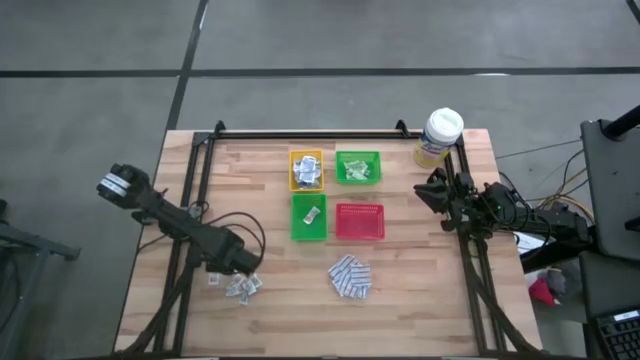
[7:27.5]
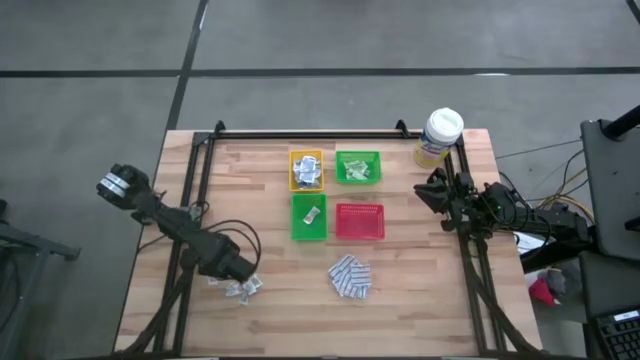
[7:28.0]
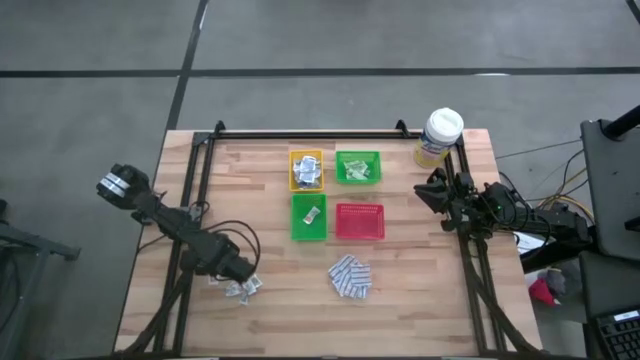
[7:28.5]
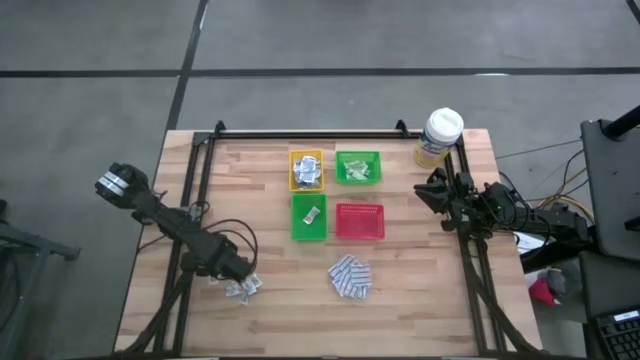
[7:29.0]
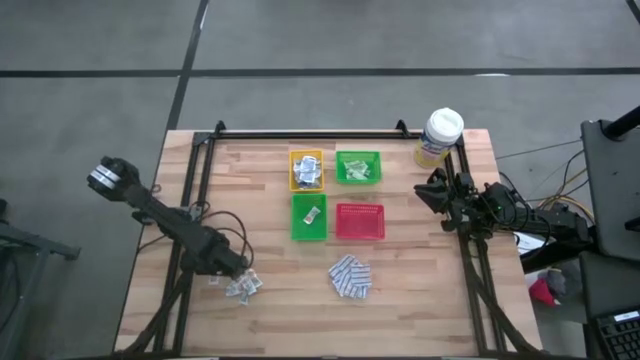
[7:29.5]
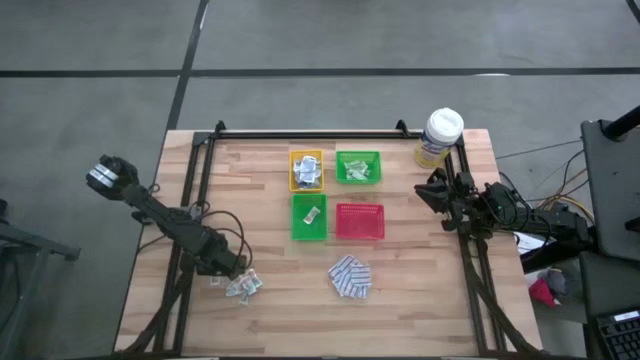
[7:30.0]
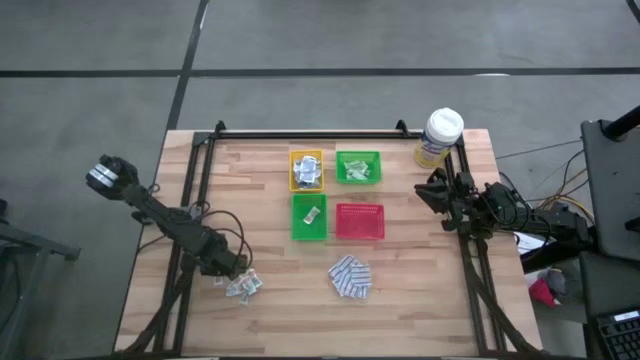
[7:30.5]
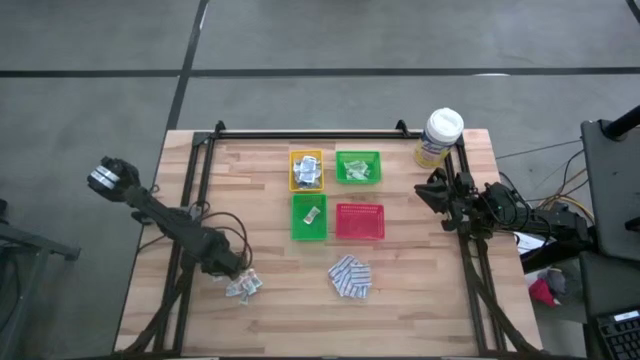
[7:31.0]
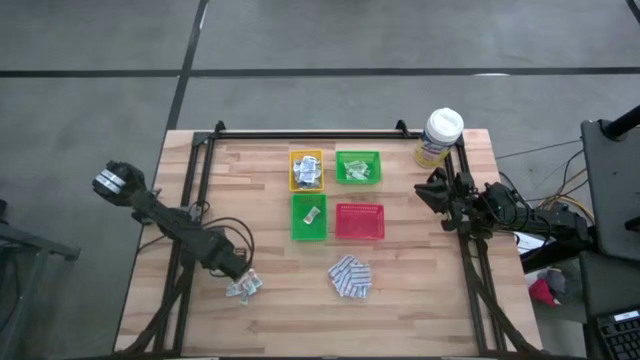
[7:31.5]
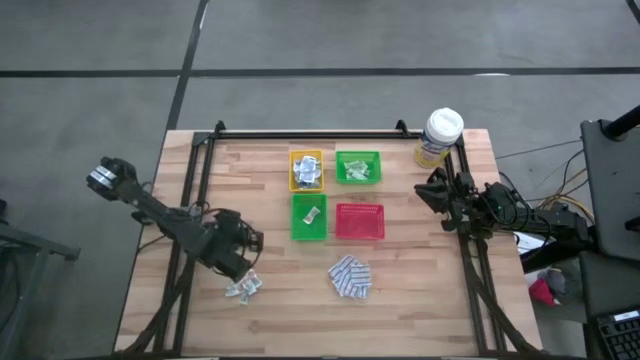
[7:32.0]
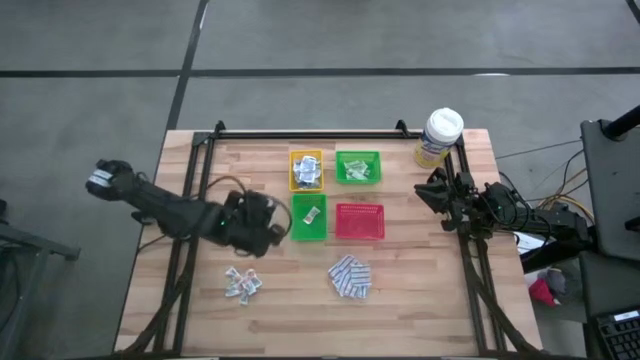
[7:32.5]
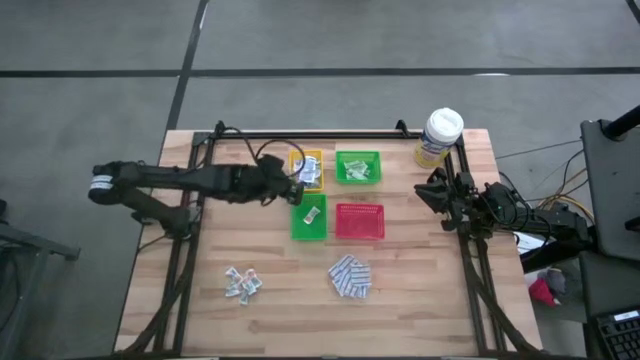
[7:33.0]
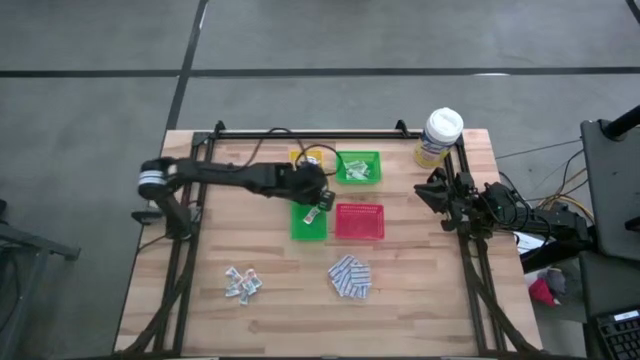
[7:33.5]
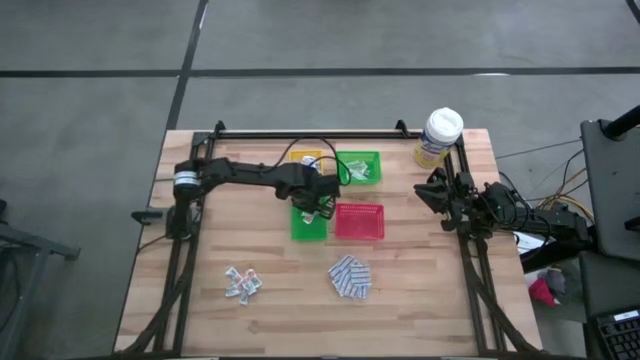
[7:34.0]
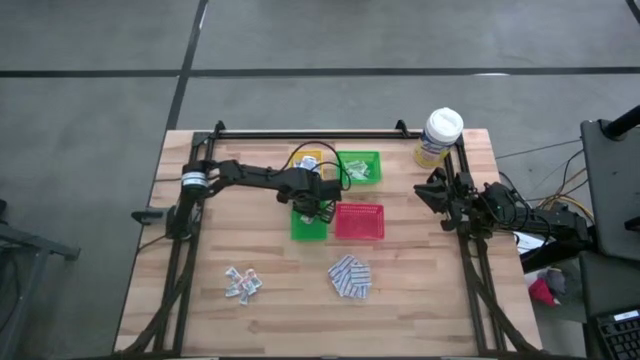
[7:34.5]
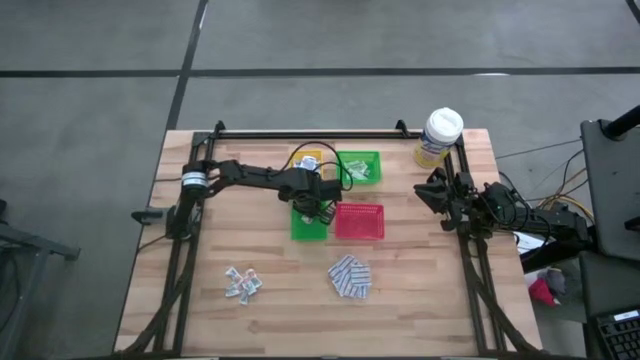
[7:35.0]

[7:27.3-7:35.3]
Task: Pick & Place First Aid Supplies
Put the orange ointment pack into the bottom green bin

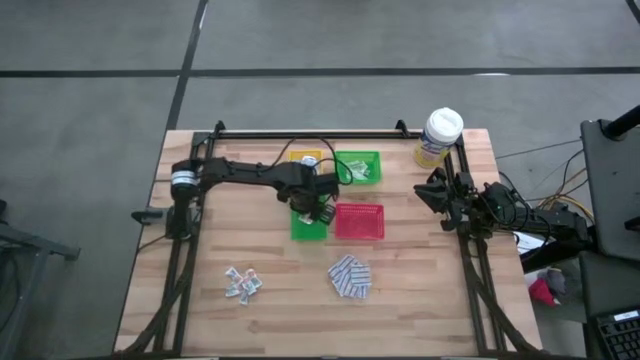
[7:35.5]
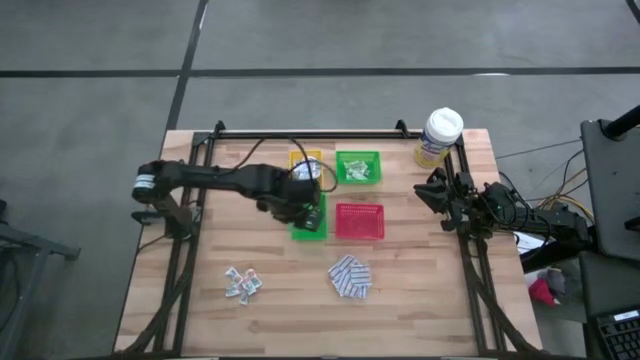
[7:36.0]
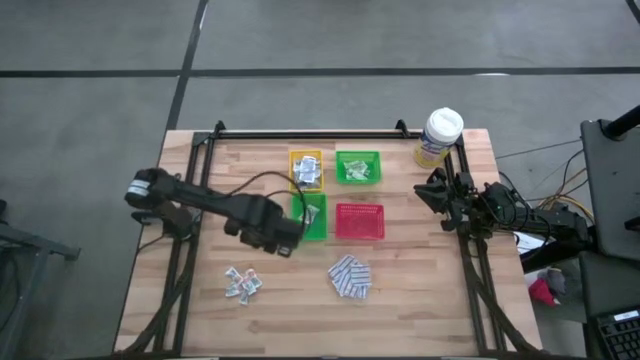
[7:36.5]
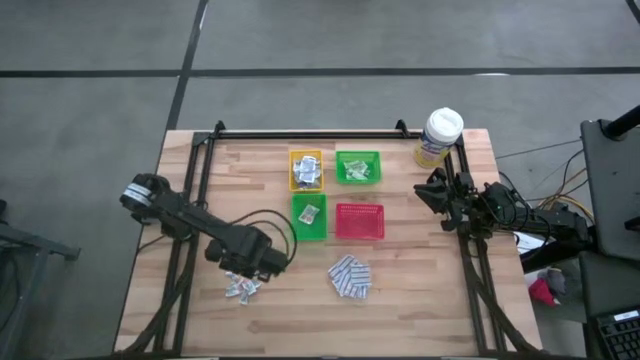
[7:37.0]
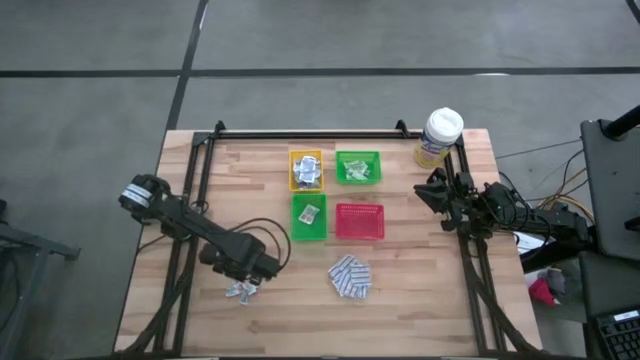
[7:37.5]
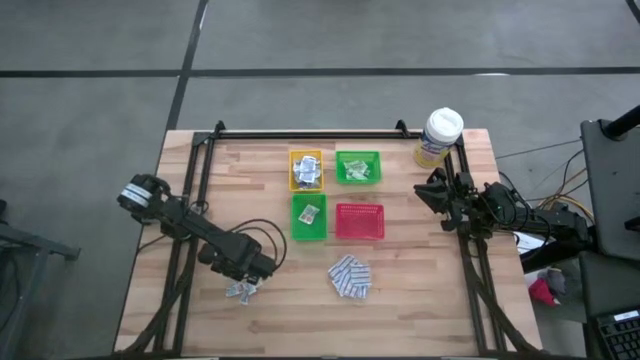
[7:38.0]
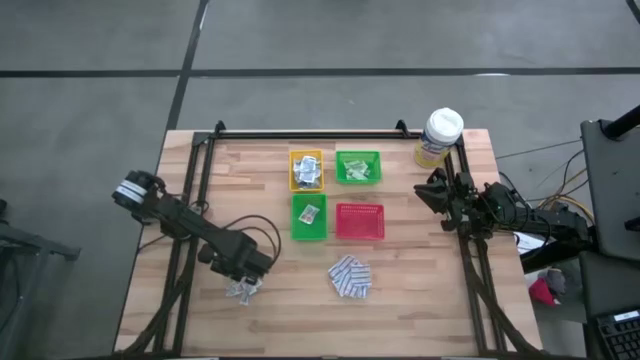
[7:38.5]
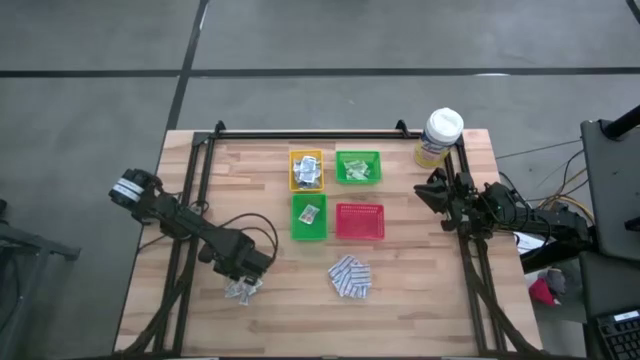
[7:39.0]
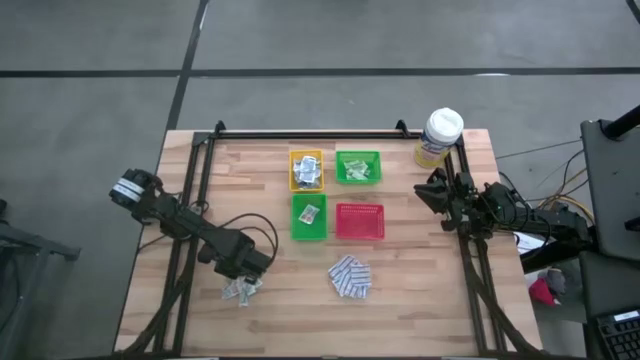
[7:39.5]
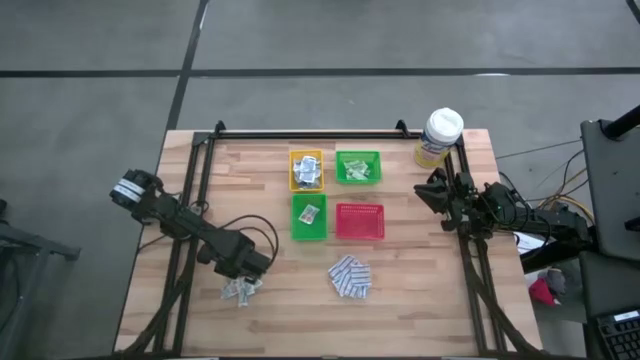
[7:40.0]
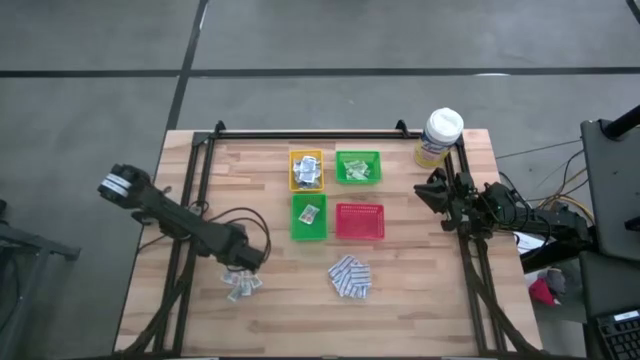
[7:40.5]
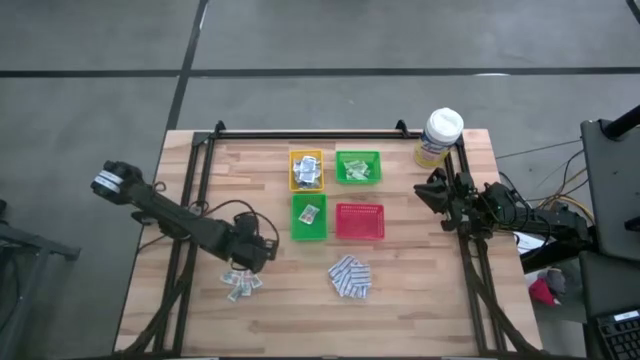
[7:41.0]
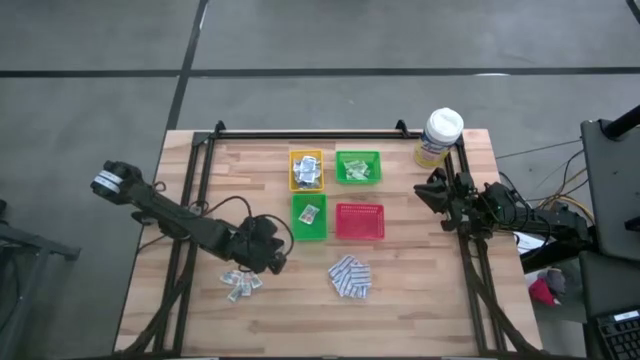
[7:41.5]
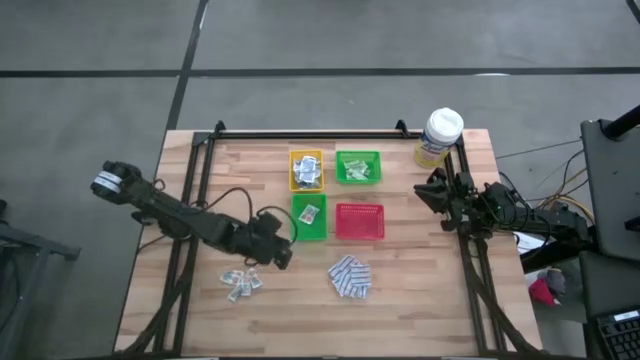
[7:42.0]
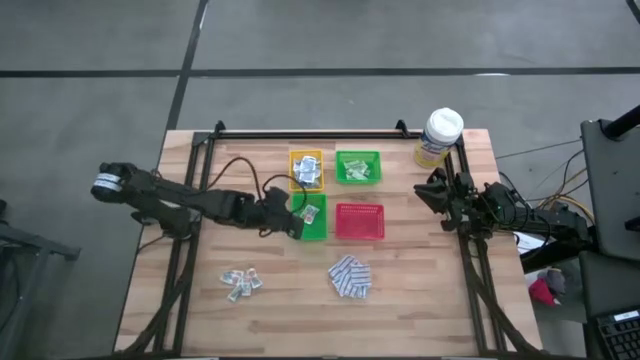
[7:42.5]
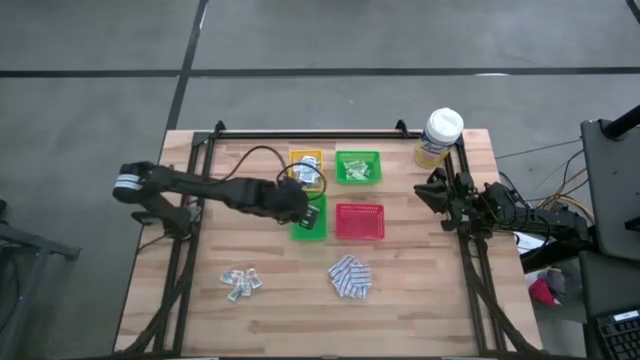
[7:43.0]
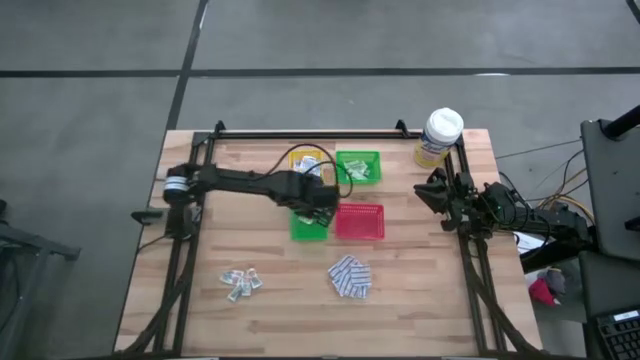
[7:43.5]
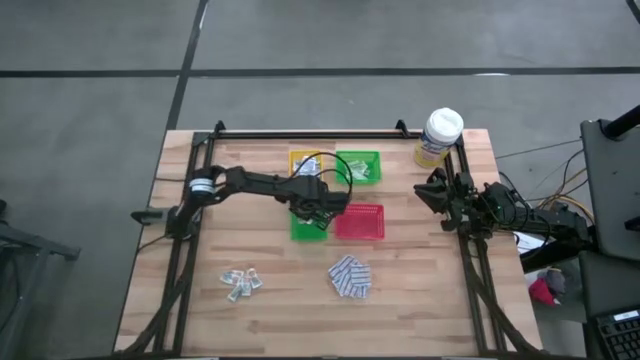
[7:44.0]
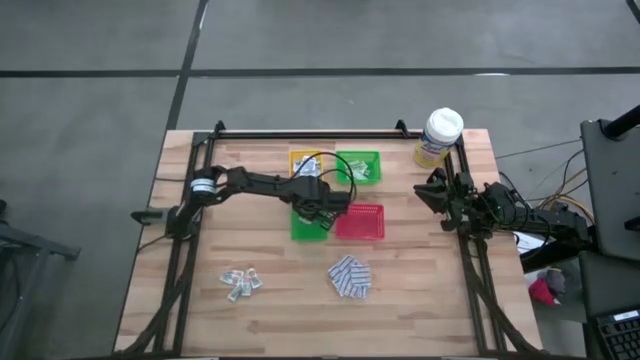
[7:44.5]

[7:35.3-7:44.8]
Put the orange ointment pack into the bottom green bin

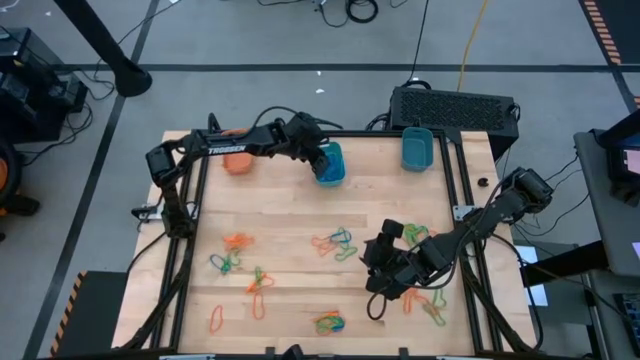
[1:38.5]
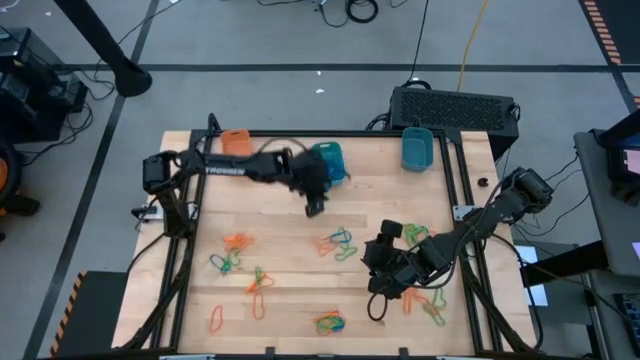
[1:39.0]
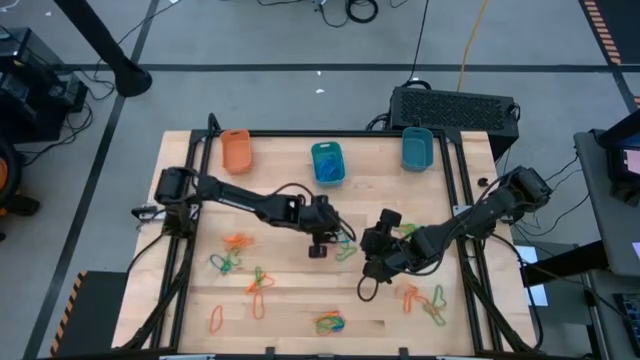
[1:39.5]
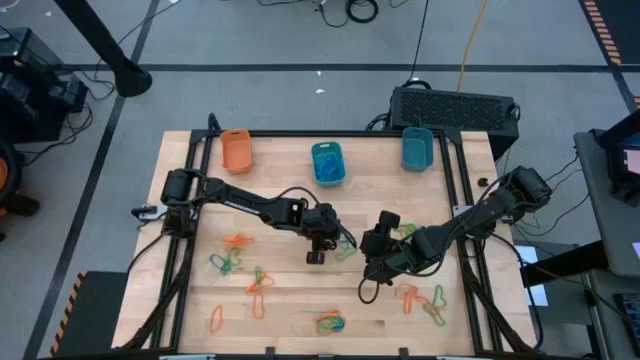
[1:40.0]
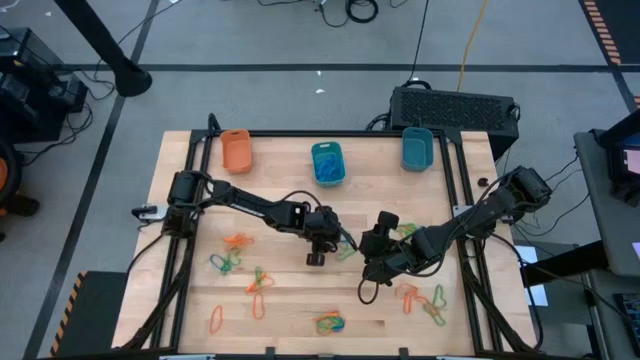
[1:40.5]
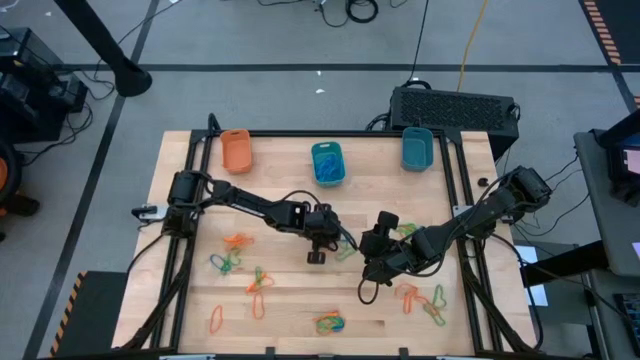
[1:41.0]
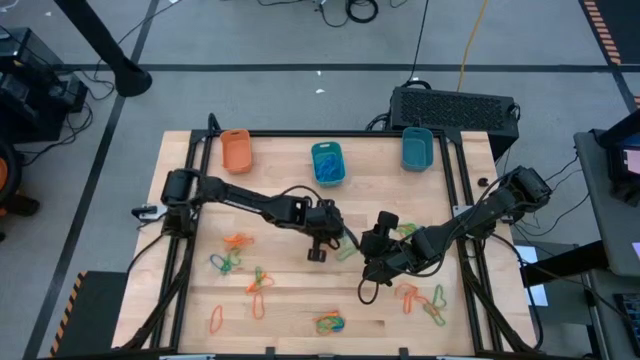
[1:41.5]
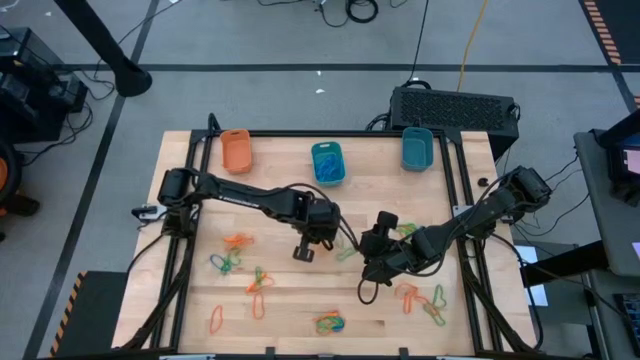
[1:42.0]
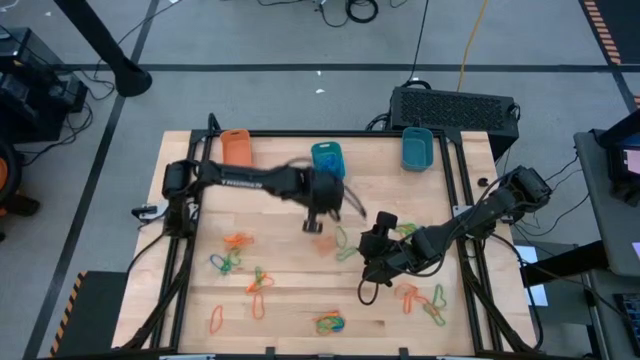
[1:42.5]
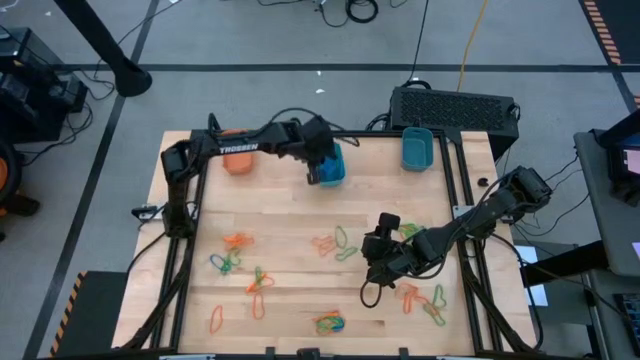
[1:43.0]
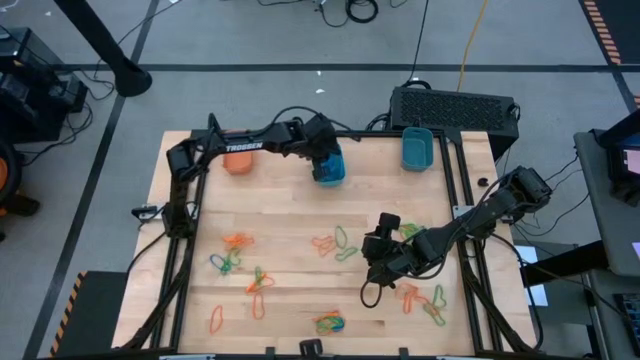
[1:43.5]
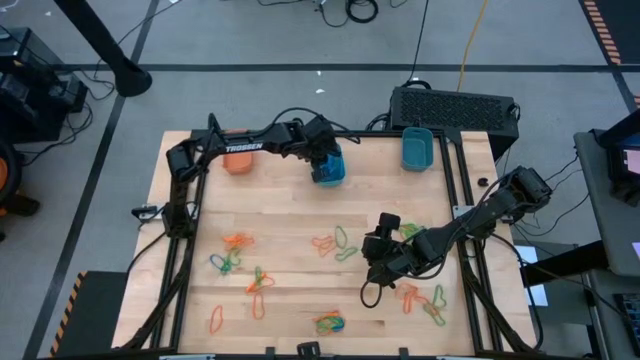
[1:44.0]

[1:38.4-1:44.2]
Task: Sort rubber bands into baskets
Put the blue rubber band into the light blue bin
